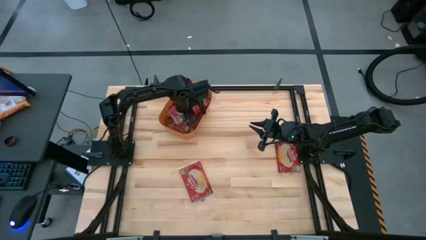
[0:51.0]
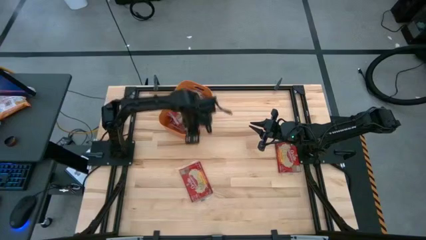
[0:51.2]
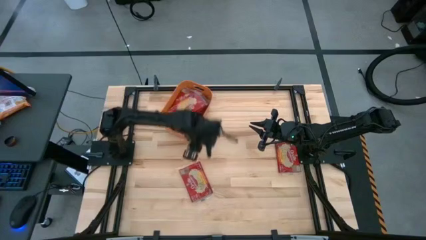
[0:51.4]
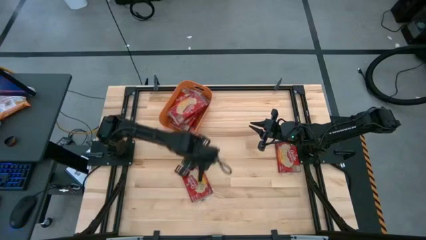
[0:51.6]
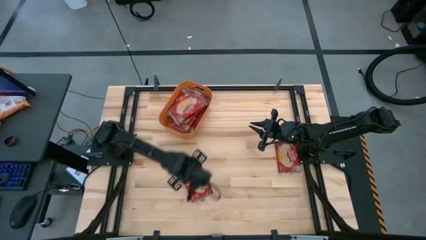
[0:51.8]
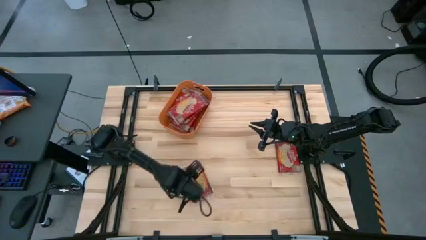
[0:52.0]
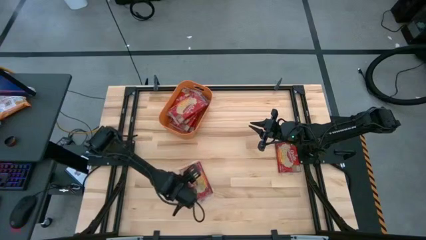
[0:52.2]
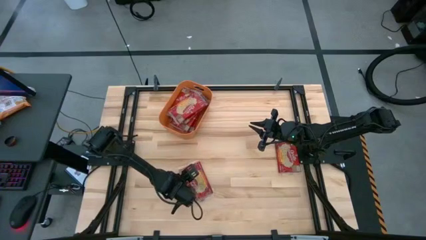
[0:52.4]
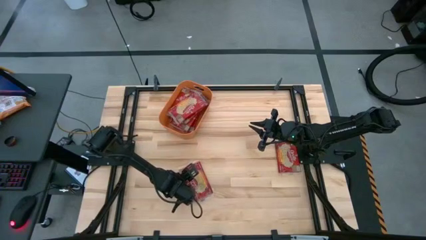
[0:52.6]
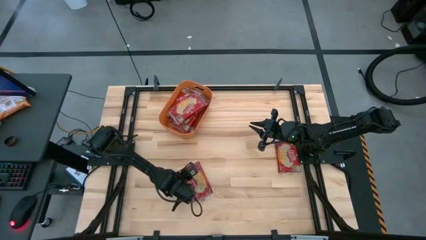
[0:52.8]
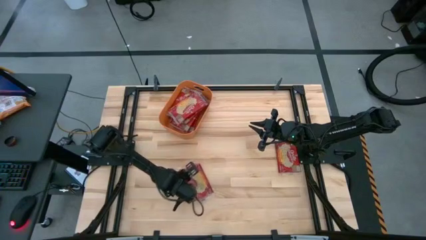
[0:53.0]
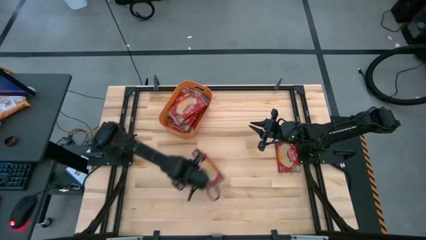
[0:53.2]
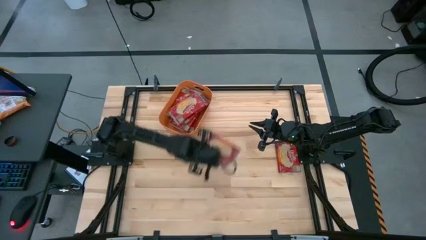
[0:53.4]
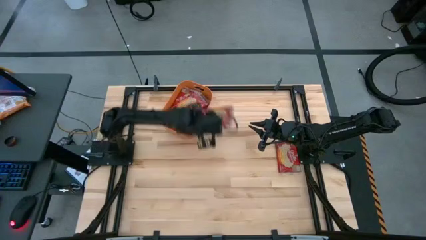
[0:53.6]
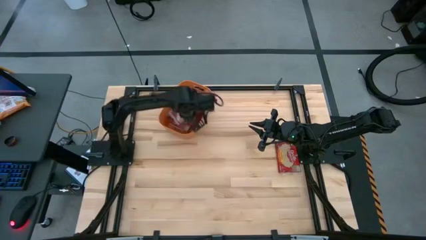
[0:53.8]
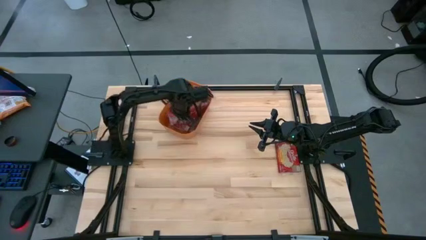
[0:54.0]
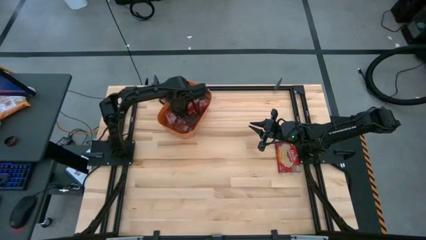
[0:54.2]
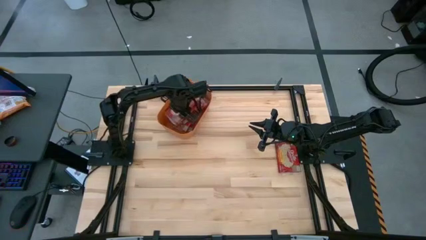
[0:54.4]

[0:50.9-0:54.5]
Task: Sort popcorn bags into baskets
Put the red popcorn bag into the orange bin

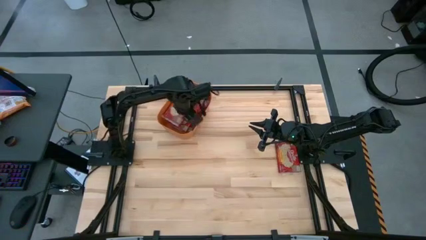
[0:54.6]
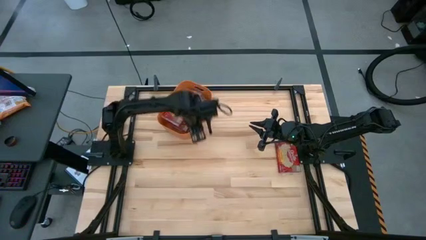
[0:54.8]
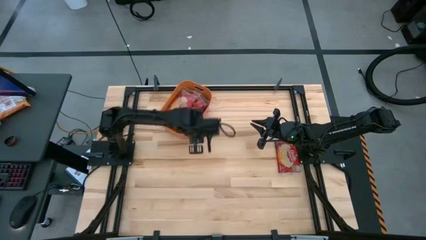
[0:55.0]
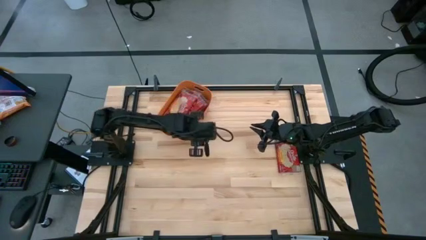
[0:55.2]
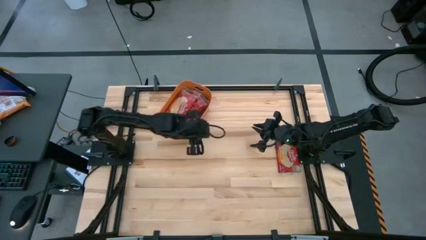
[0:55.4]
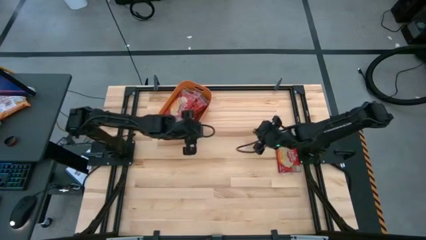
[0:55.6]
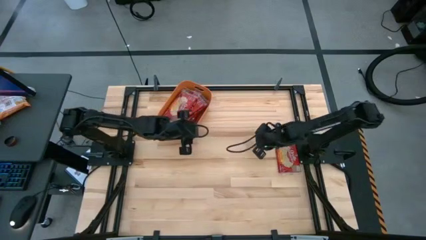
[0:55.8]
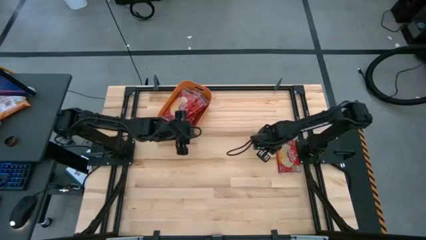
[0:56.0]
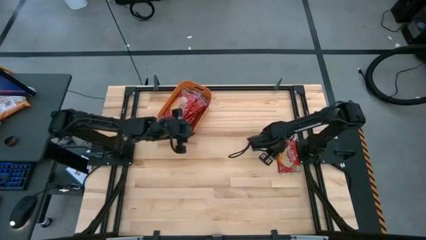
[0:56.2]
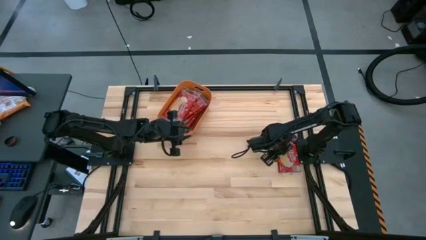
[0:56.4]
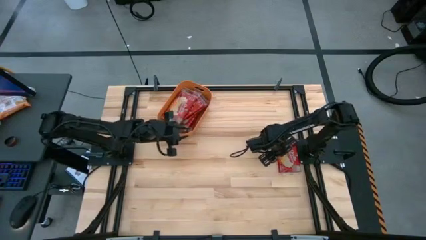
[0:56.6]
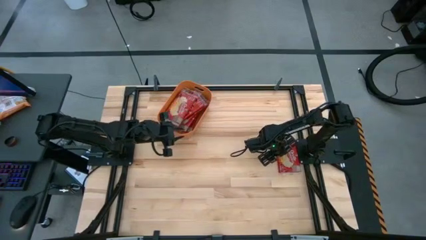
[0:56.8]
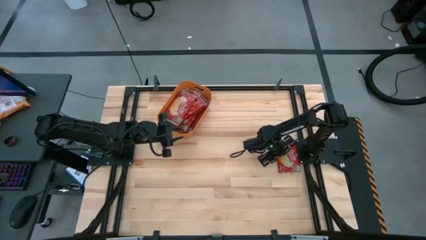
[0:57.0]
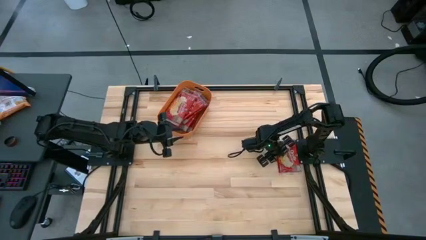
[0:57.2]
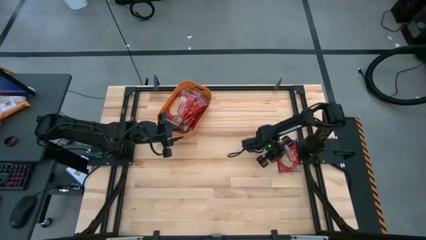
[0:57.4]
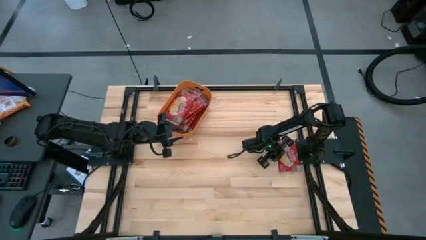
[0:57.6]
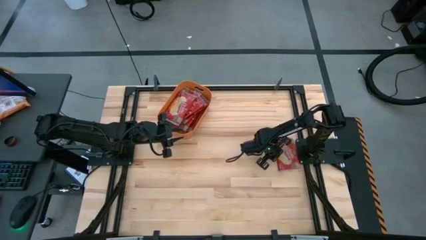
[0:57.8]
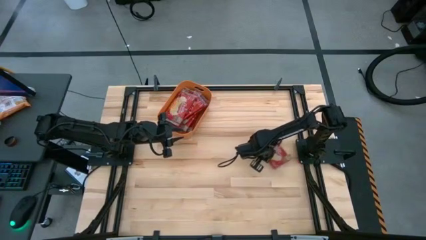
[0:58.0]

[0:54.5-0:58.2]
Put the red popcorn bag into the orange bin

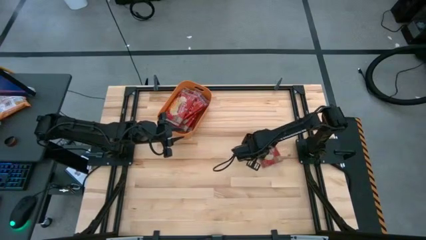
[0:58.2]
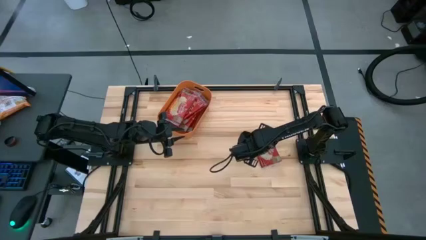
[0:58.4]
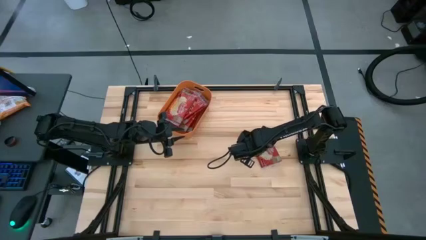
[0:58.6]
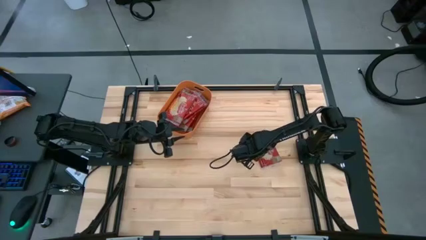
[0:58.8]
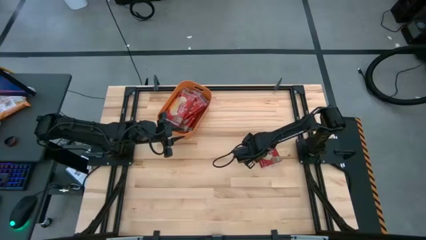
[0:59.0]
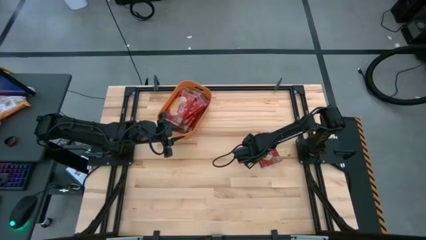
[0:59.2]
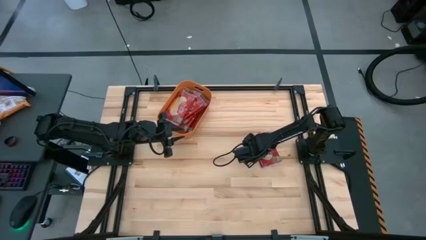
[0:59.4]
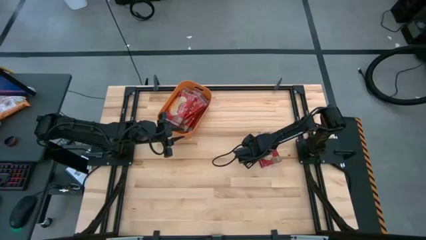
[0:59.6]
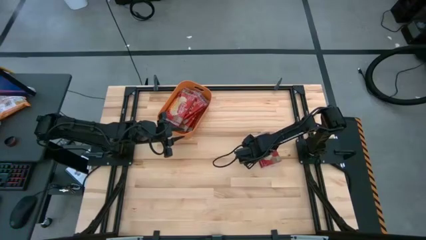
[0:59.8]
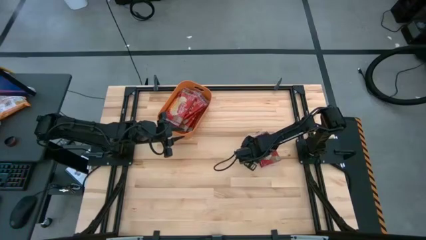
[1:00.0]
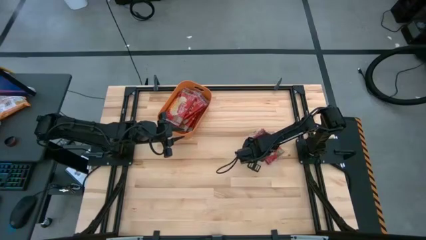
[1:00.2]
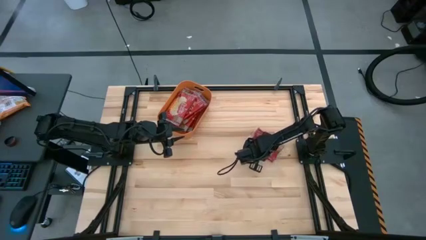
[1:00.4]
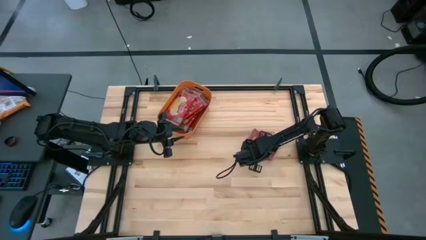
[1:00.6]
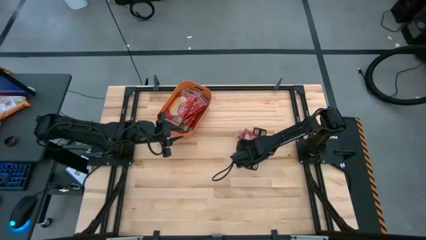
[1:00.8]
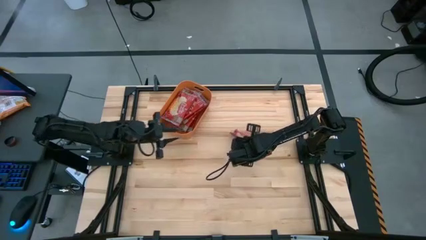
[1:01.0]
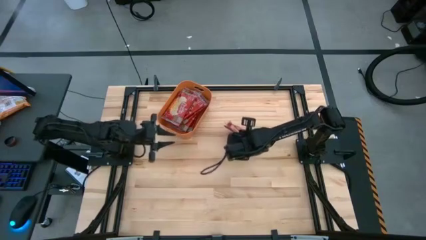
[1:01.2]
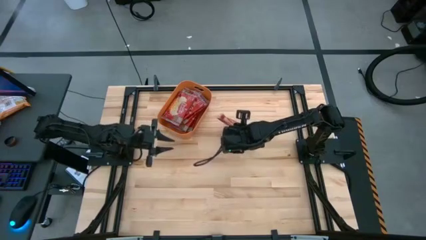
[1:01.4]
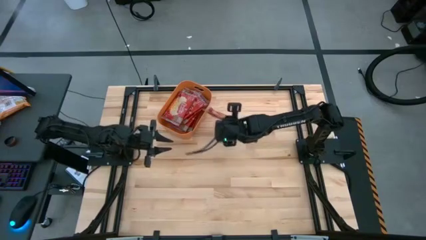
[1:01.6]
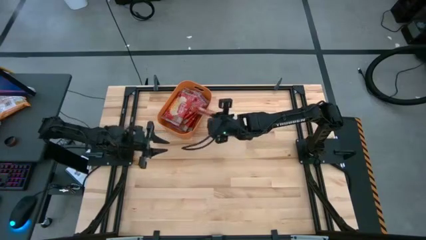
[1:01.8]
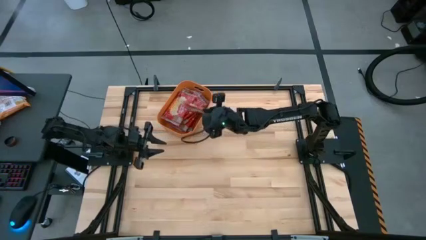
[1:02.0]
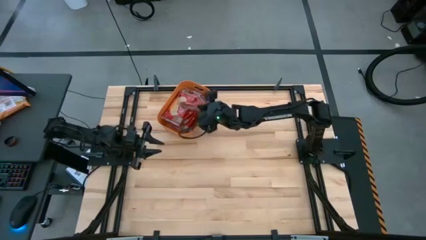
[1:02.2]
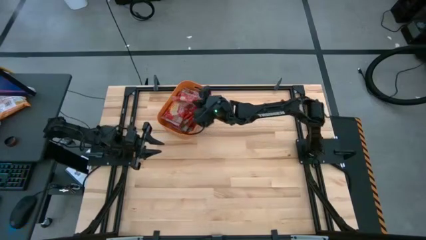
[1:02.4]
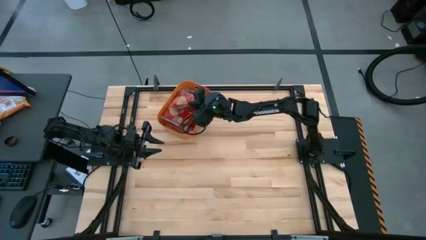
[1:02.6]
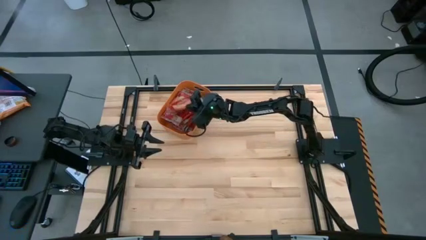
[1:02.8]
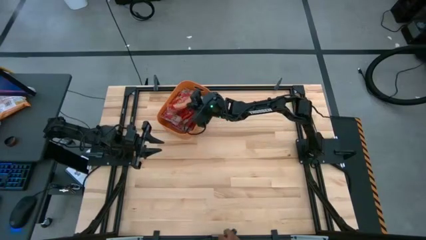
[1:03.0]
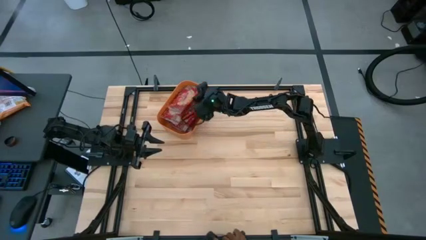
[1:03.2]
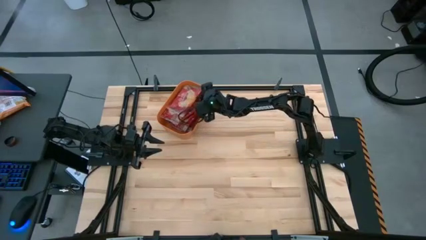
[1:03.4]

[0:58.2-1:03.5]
Put the red popcorn bag into the orange bin

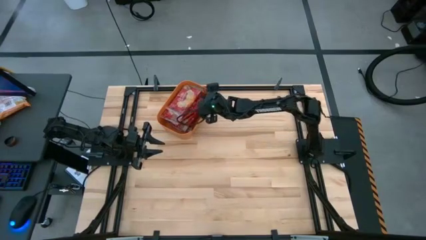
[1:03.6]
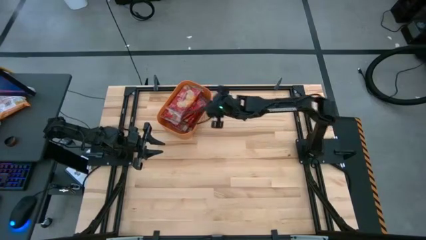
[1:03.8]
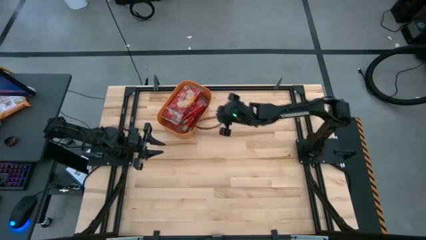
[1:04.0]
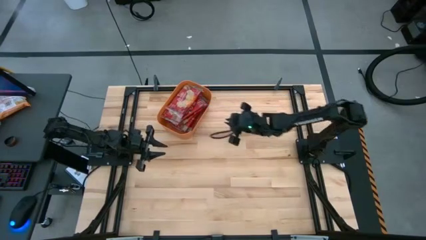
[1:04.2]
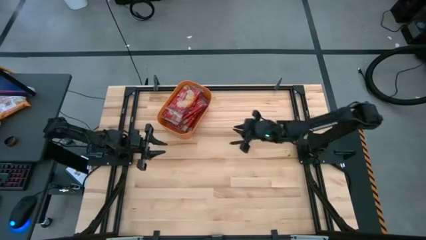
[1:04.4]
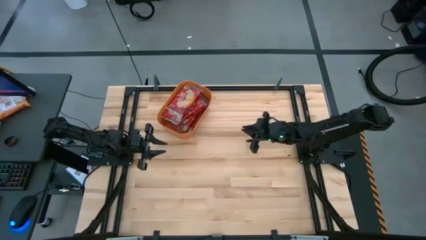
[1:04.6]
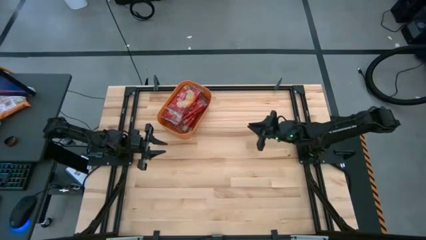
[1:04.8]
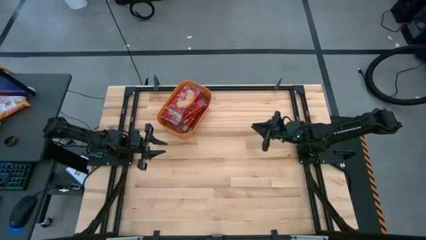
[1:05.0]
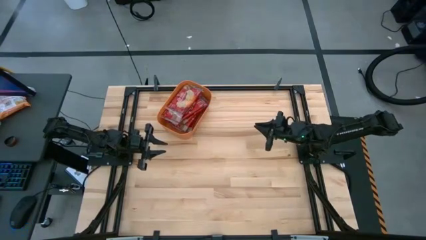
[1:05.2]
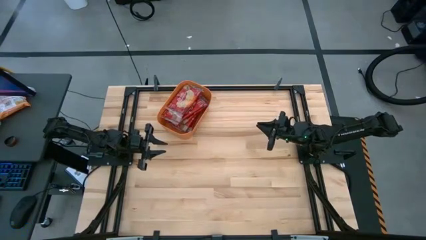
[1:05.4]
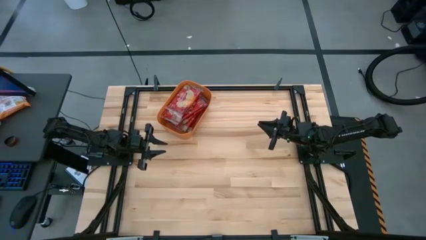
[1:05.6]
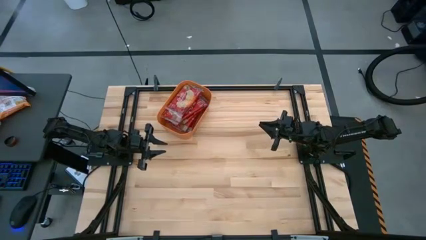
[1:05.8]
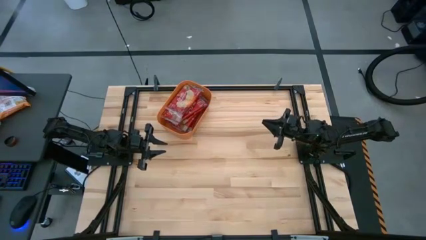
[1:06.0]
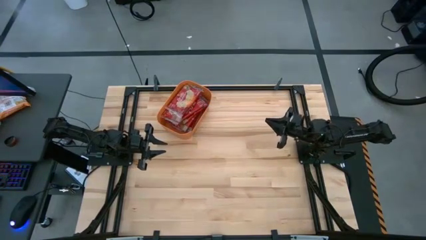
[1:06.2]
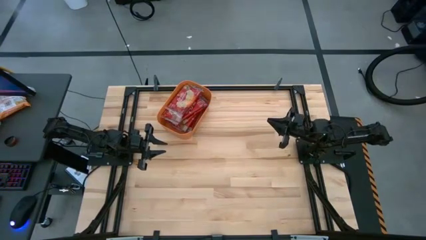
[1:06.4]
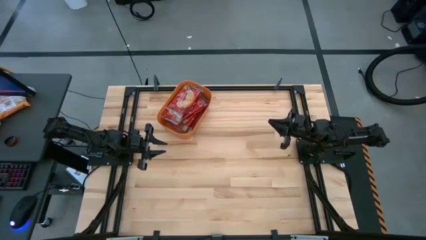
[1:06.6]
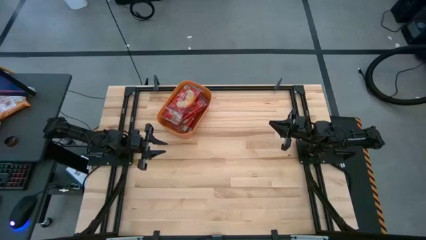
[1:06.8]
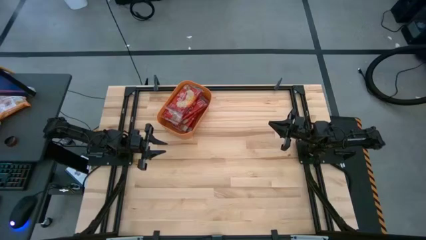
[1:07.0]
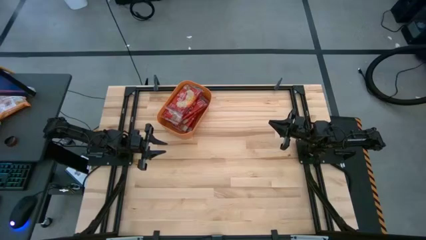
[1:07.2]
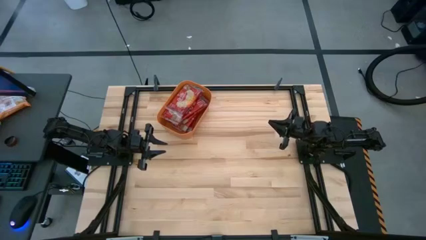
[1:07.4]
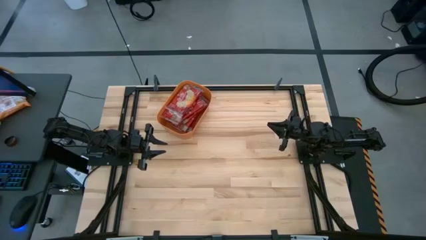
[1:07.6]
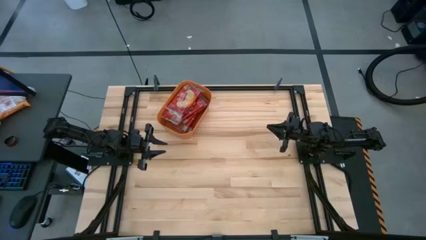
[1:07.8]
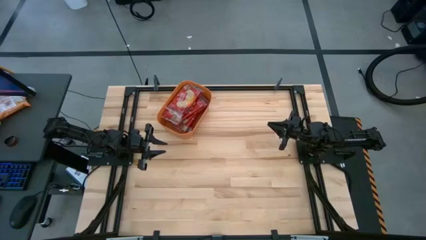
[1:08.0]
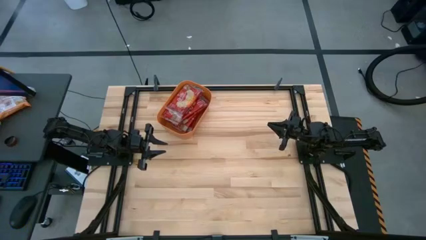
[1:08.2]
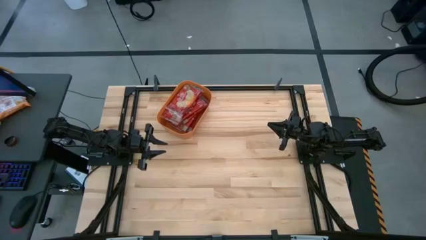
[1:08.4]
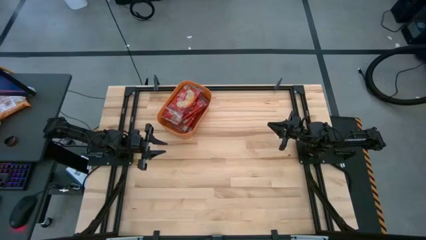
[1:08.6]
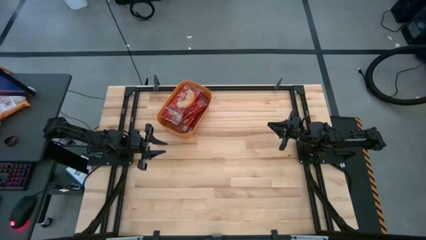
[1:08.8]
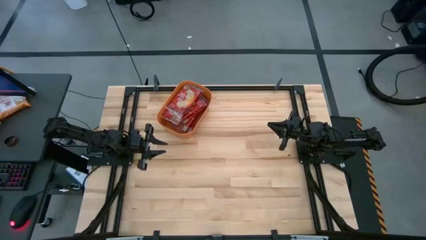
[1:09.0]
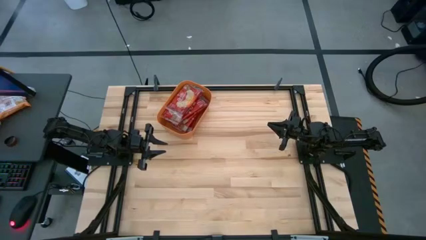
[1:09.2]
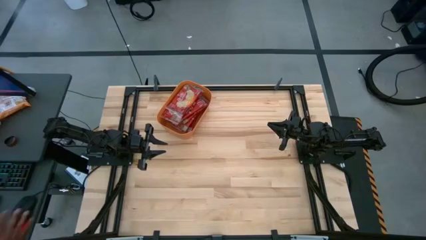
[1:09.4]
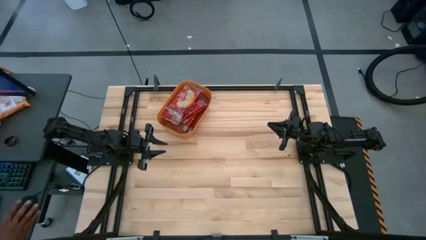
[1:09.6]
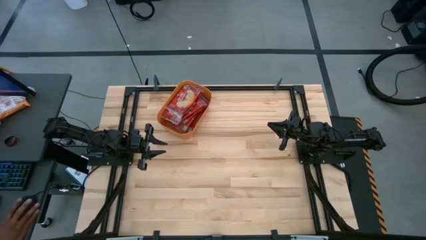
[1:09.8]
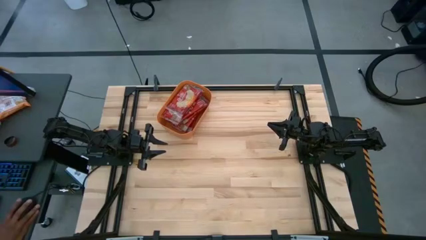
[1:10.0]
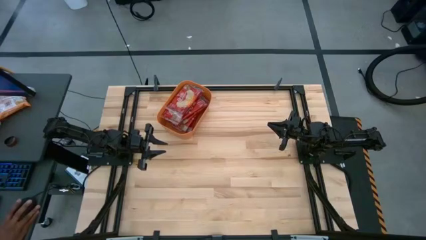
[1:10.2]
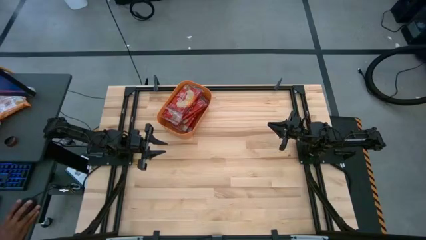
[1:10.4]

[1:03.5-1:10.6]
Return to Home Position
